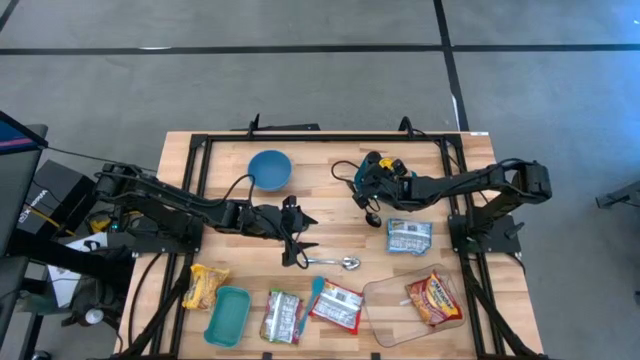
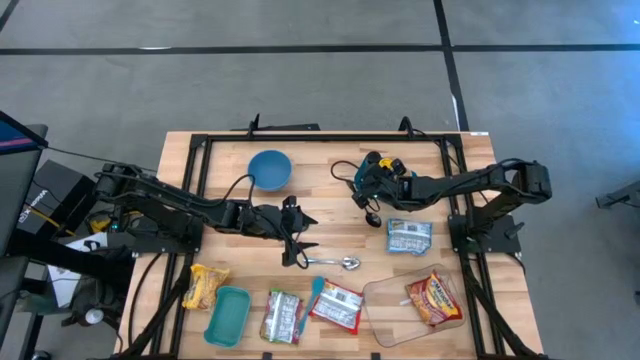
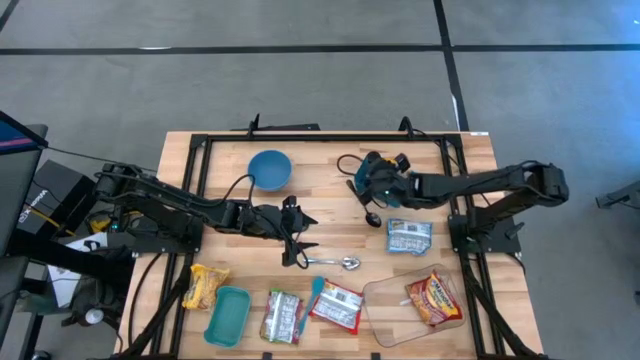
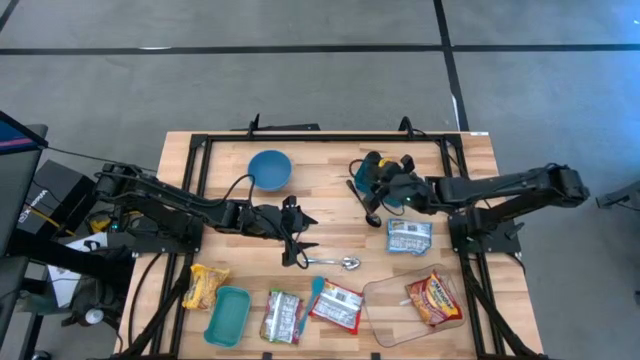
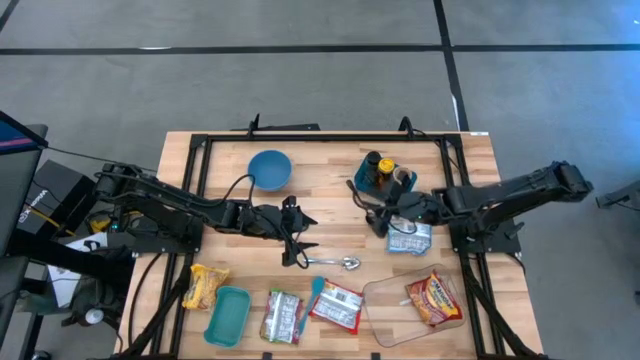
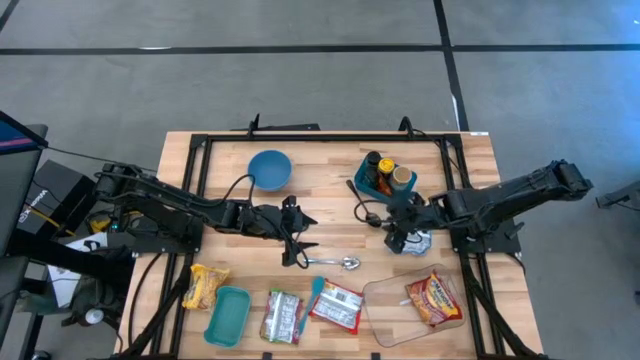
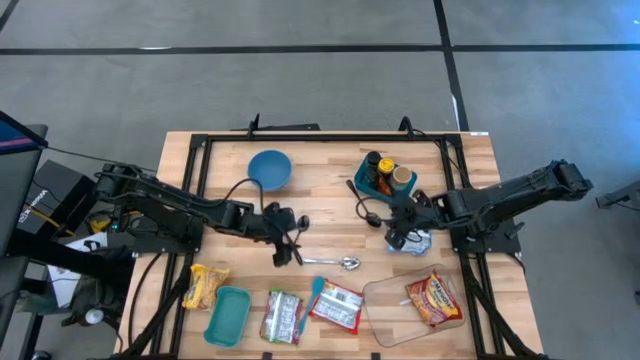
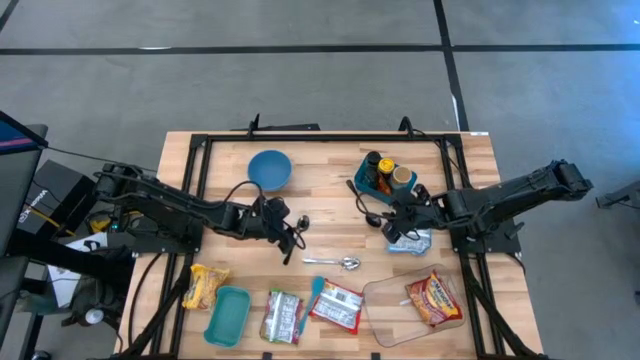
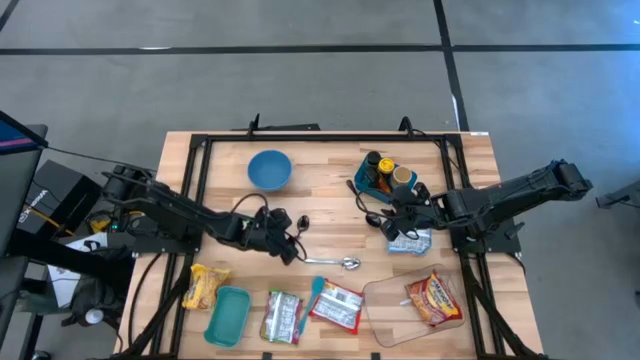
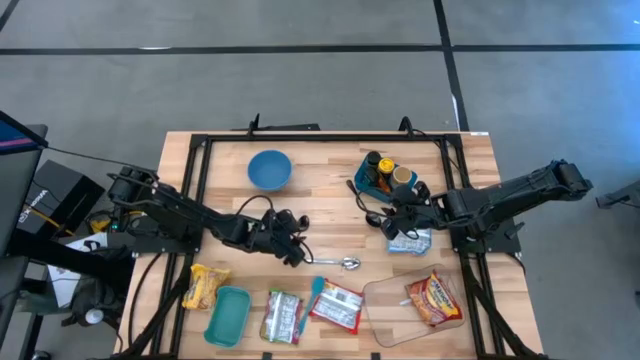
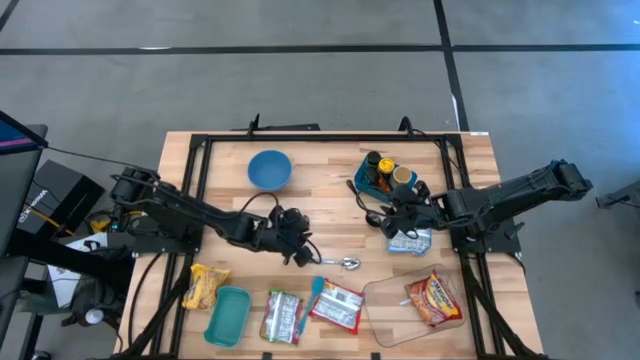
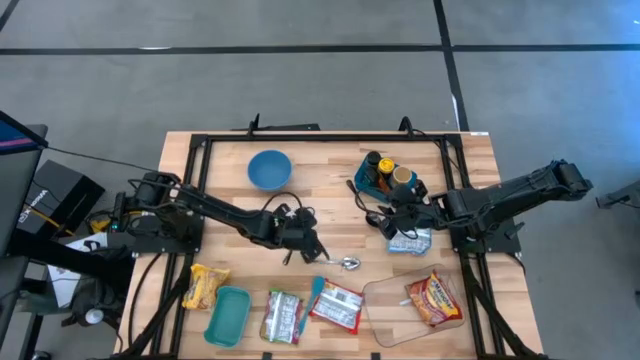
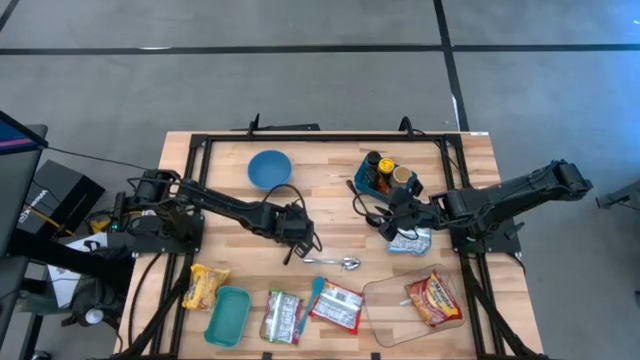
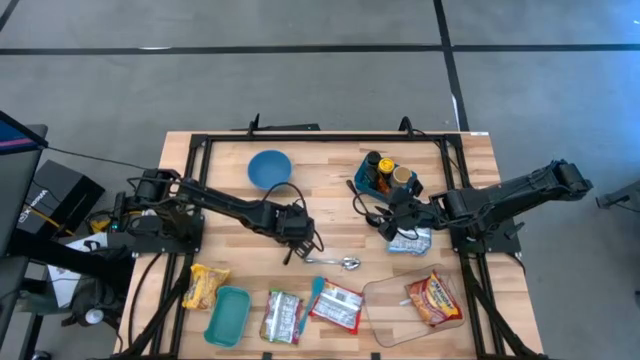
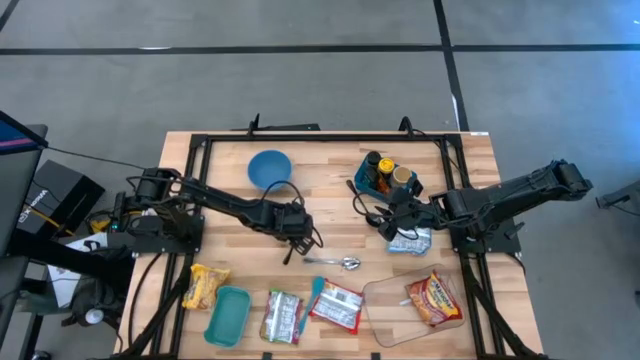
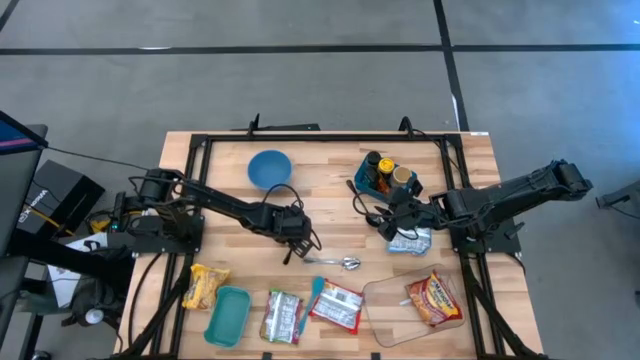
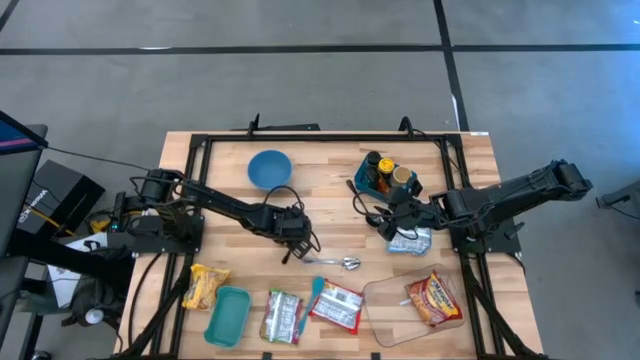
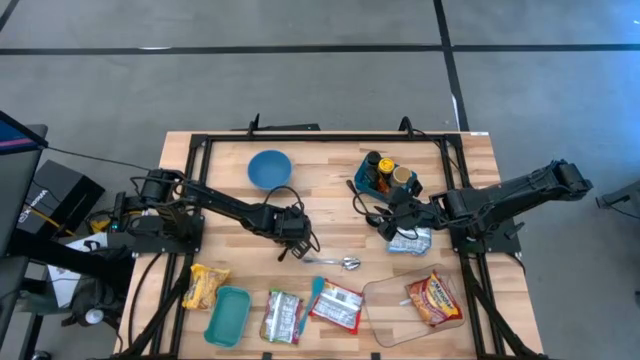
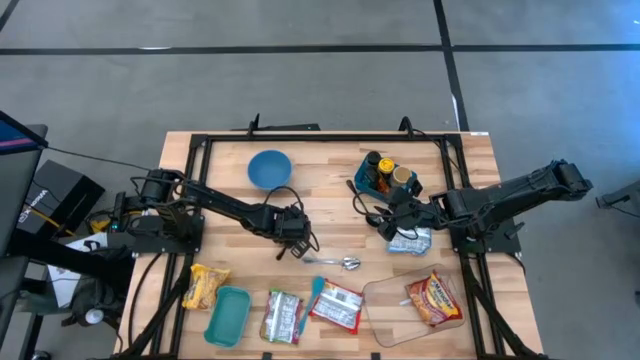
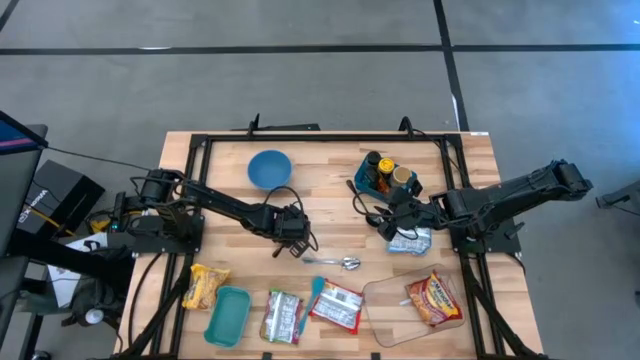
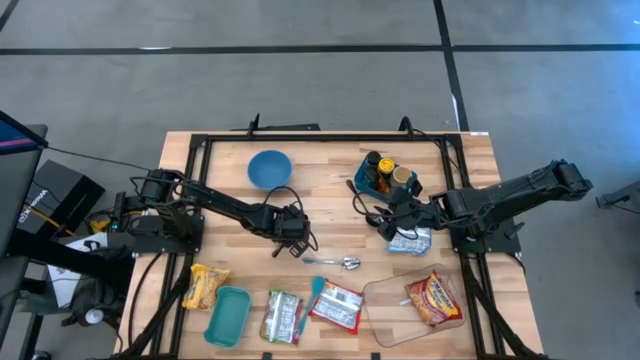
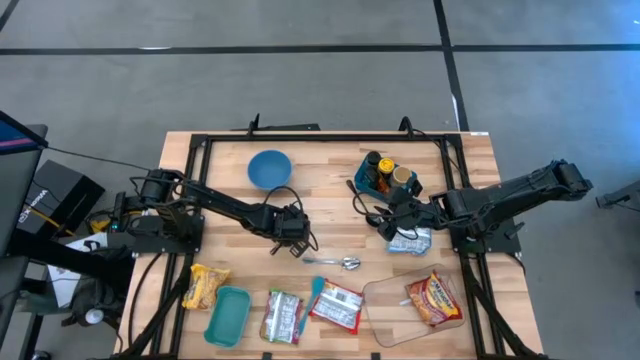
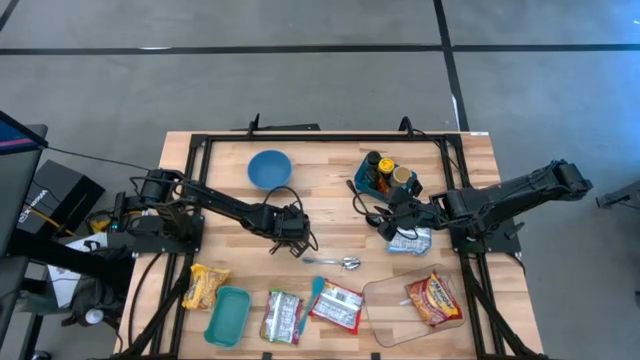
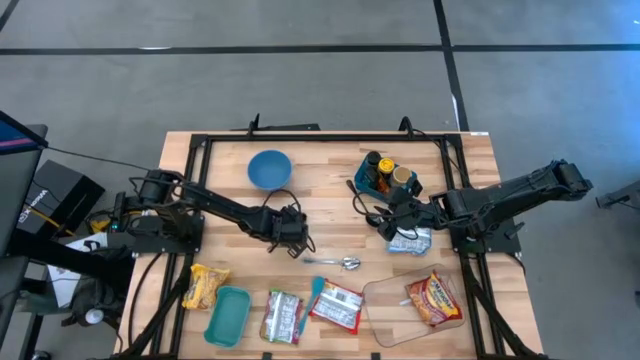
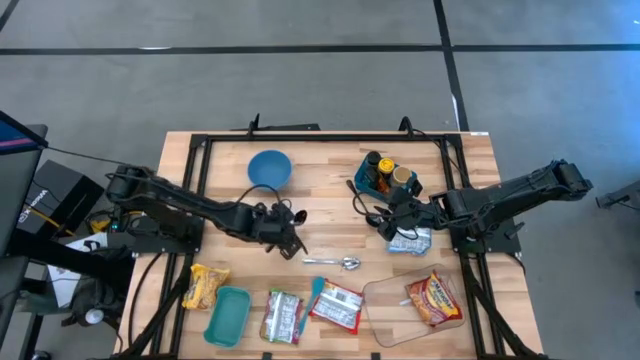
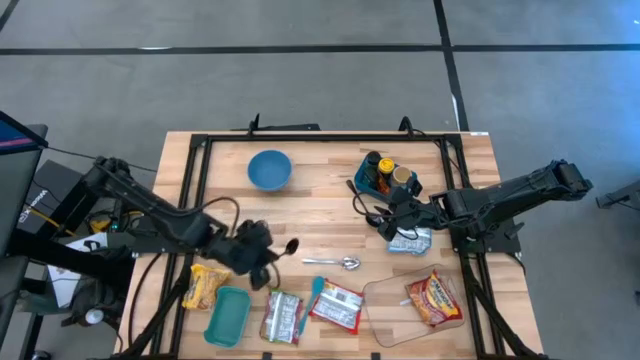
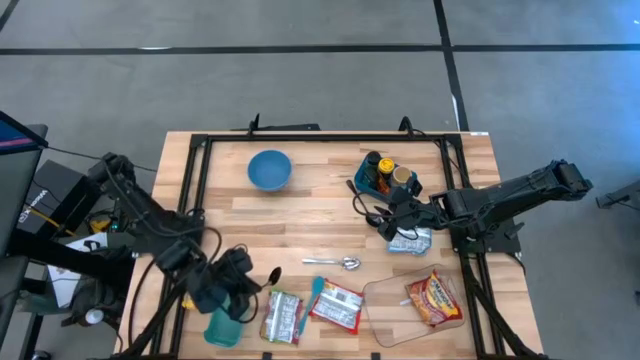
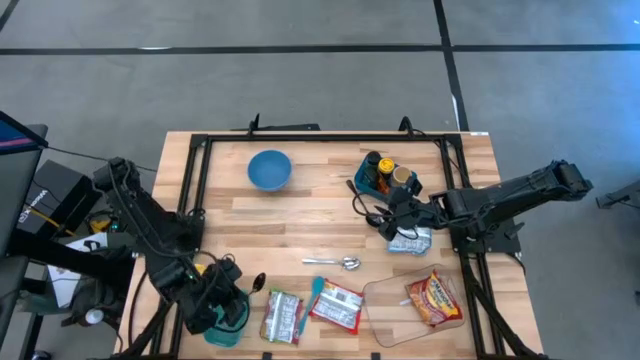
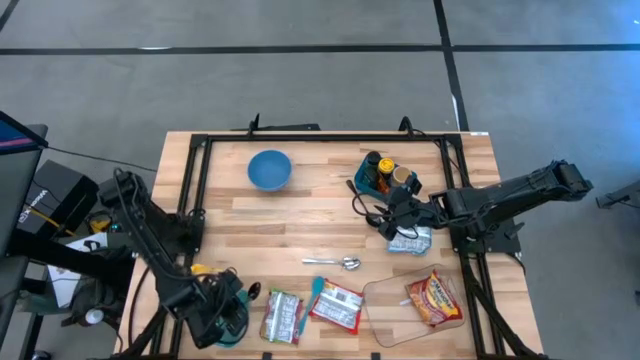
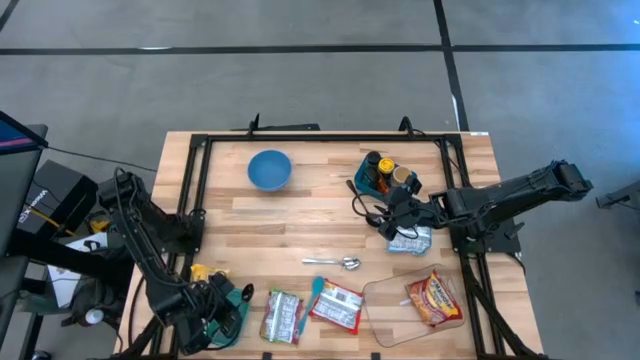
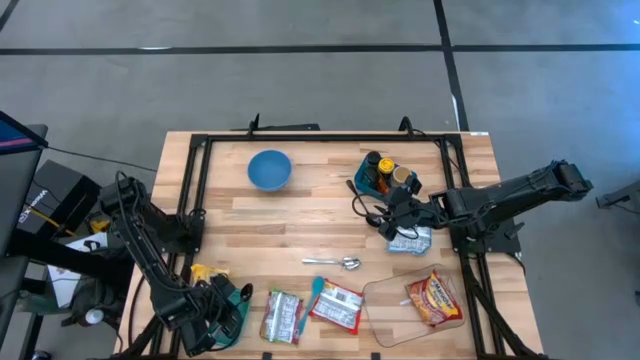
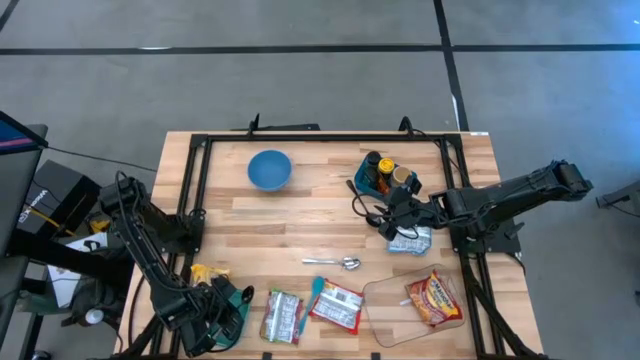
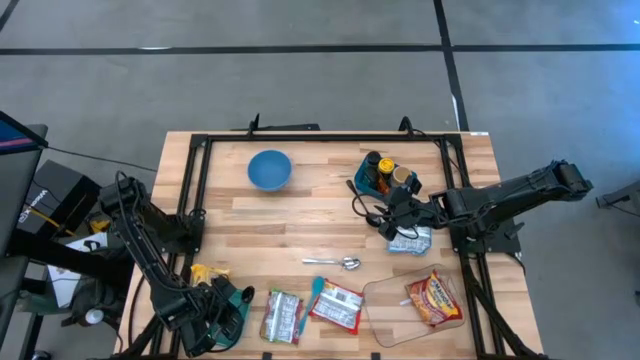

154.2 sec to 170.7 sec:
Task: Pick & Place Food Item
Put the left black spoon into the green bin

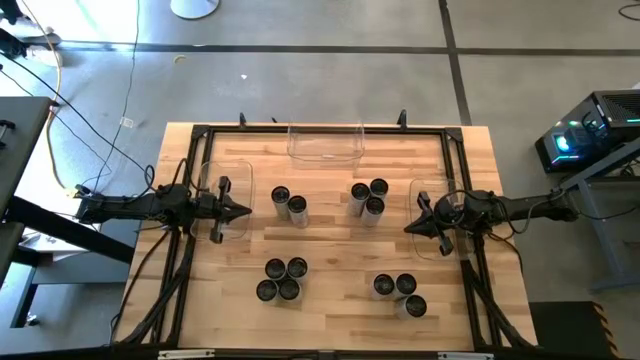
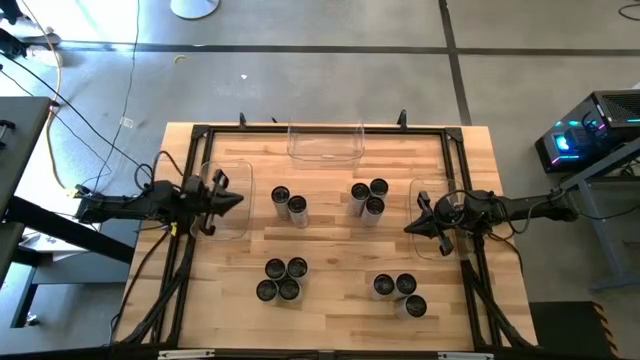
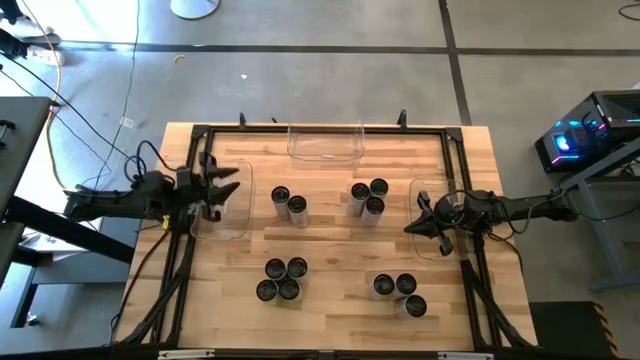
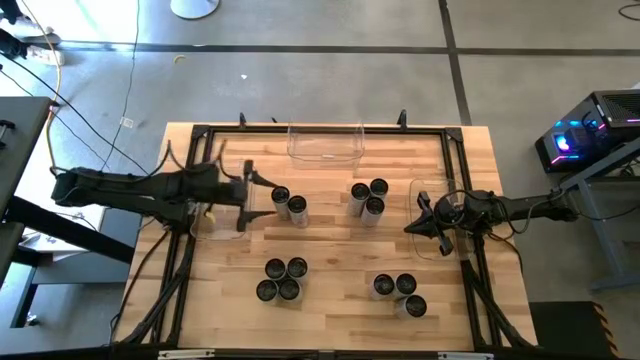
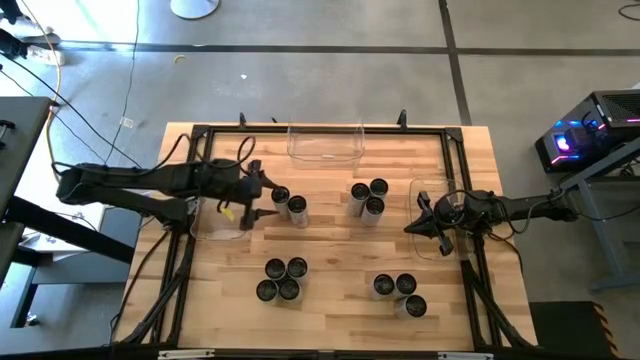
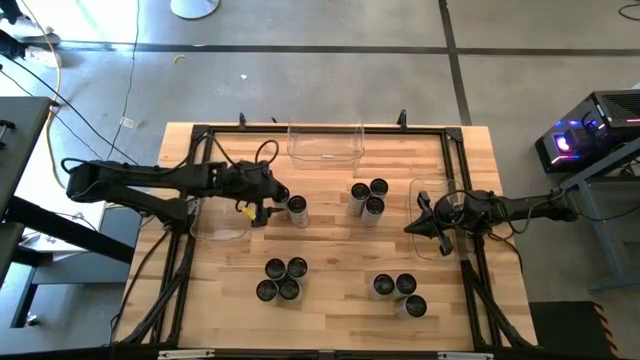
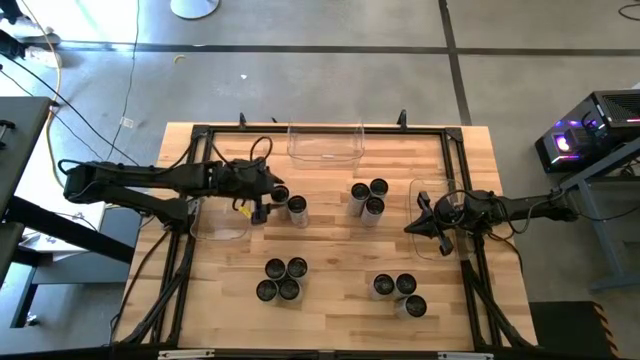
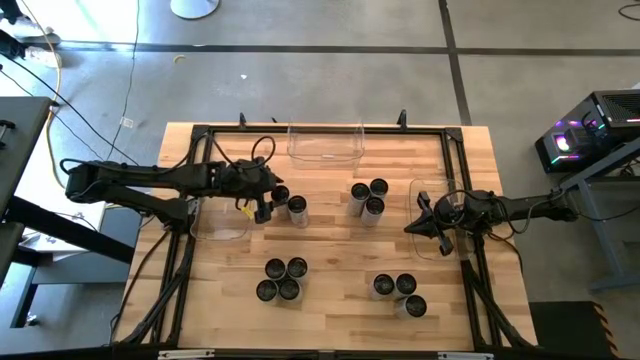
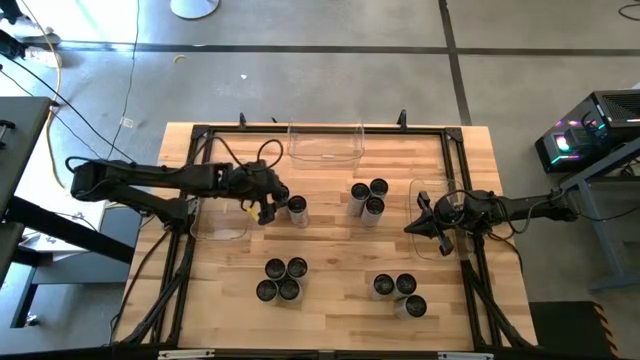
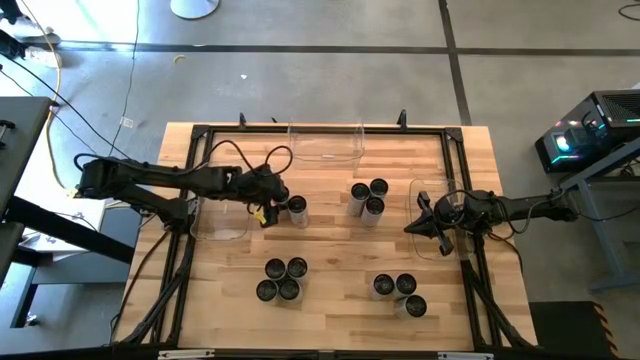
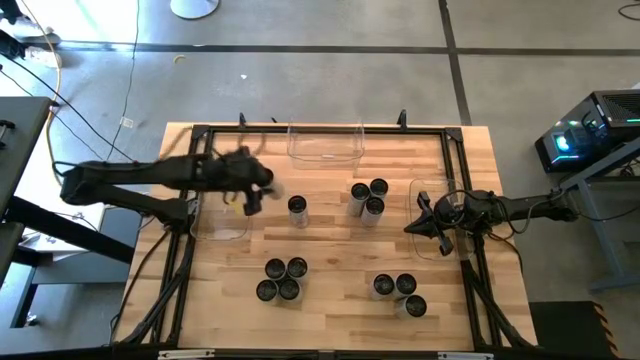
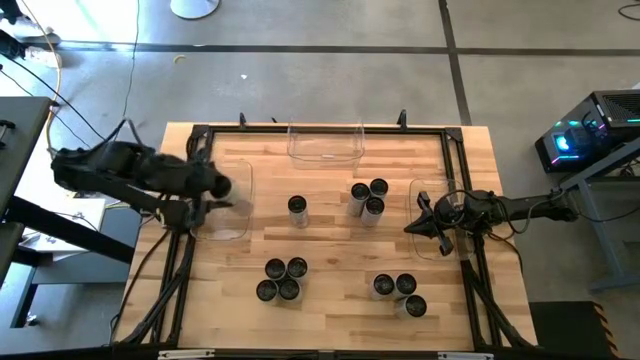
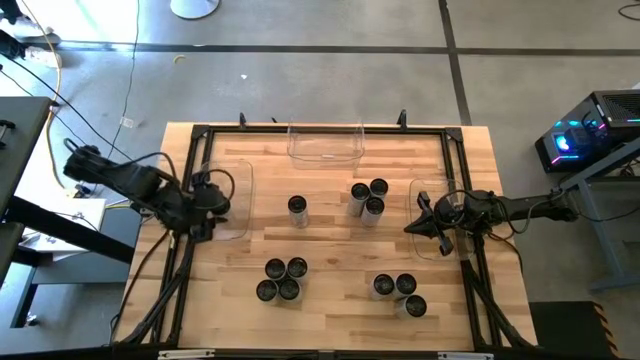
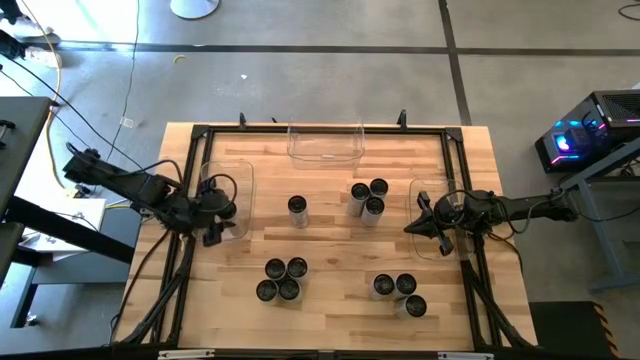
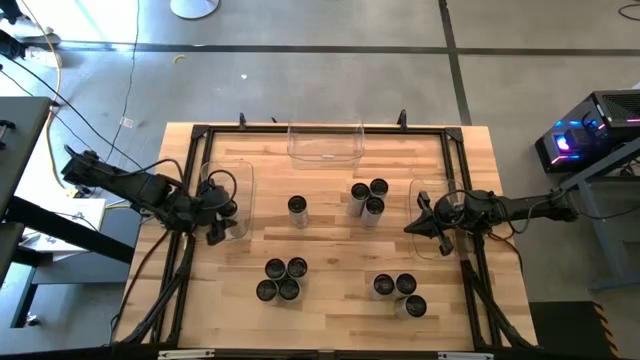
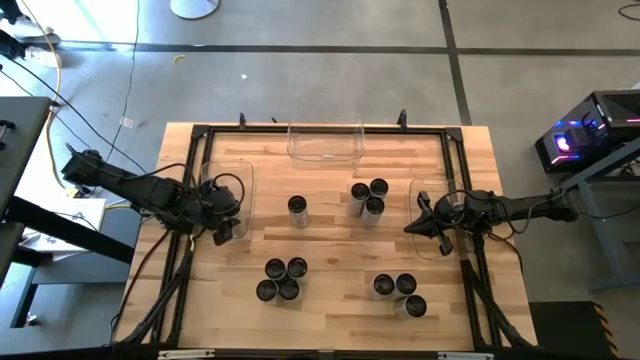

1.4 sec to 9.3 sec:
Task: Sort soda cans
Put the white-yellow soda can into the left transparent bin
